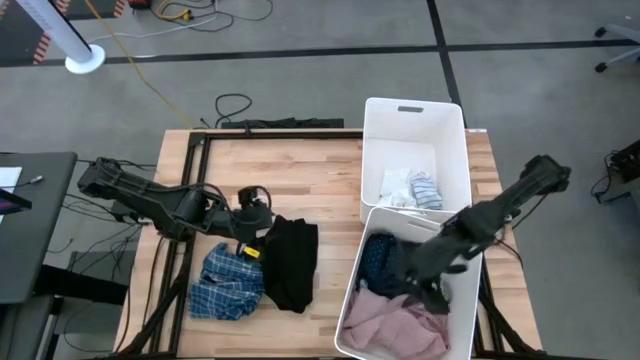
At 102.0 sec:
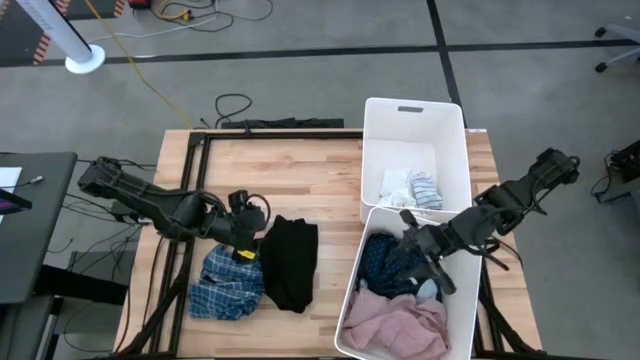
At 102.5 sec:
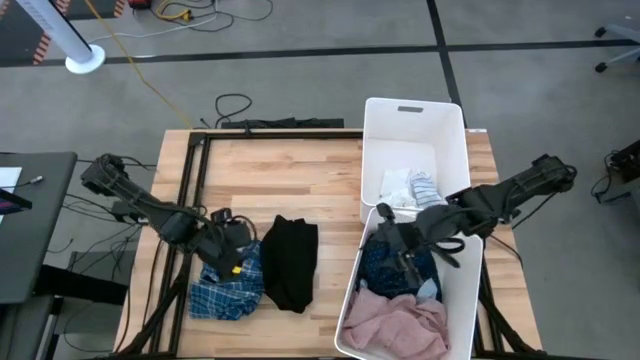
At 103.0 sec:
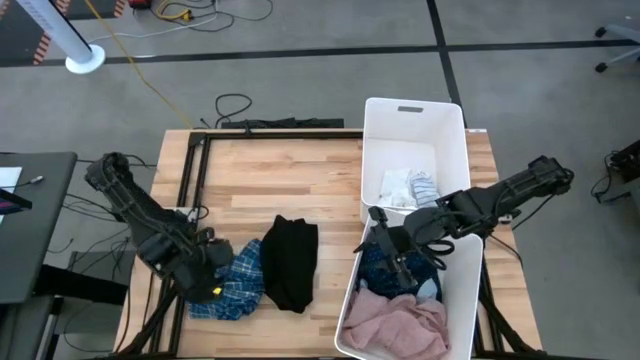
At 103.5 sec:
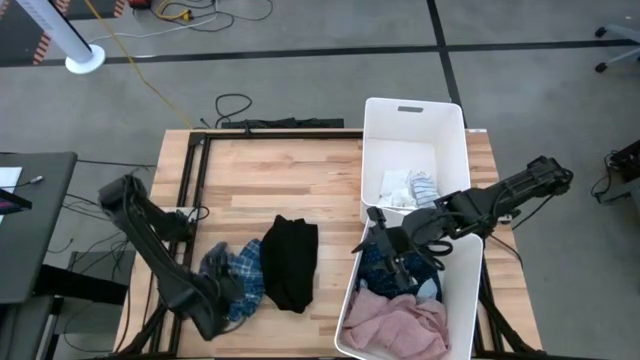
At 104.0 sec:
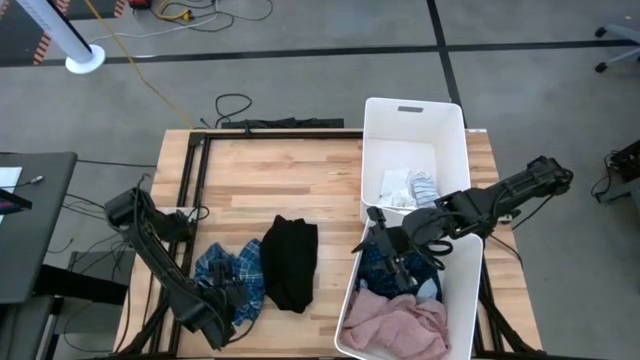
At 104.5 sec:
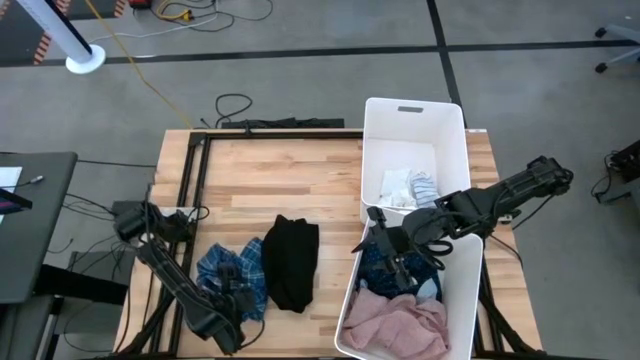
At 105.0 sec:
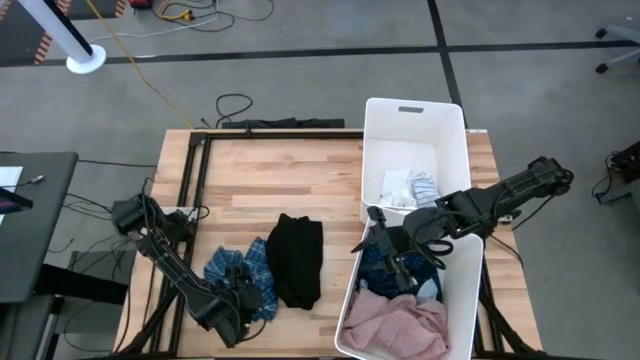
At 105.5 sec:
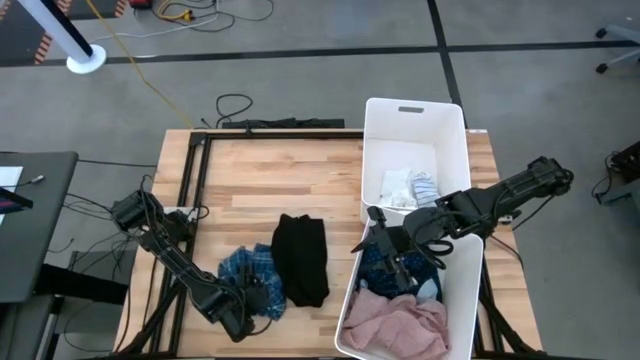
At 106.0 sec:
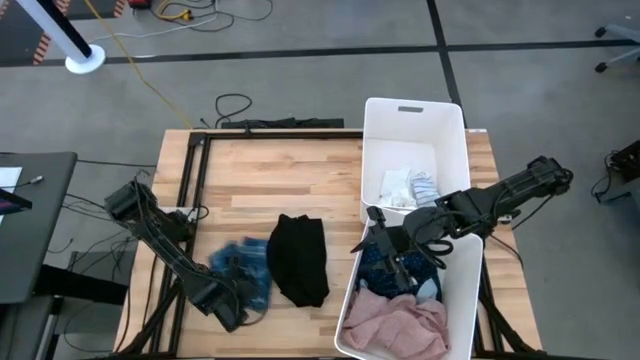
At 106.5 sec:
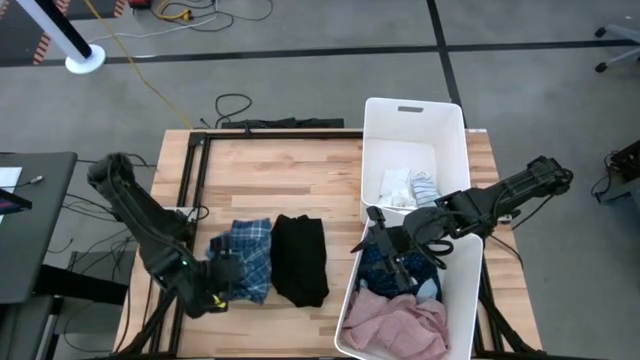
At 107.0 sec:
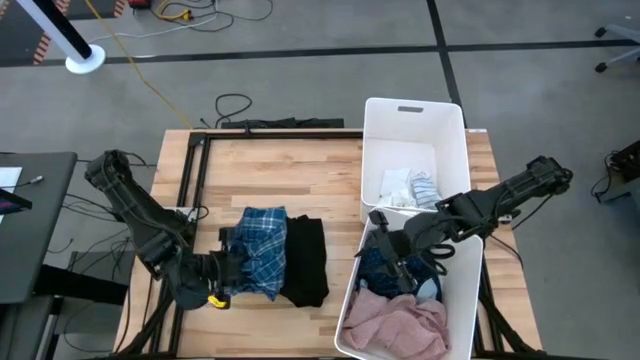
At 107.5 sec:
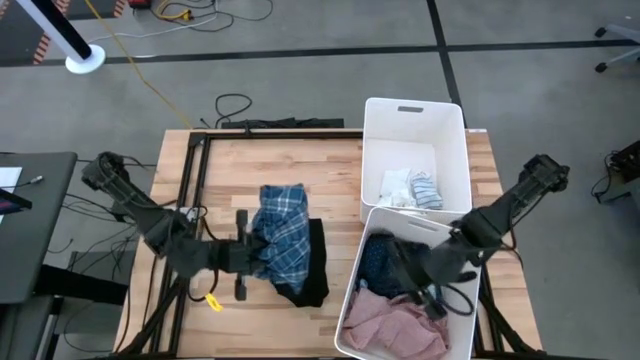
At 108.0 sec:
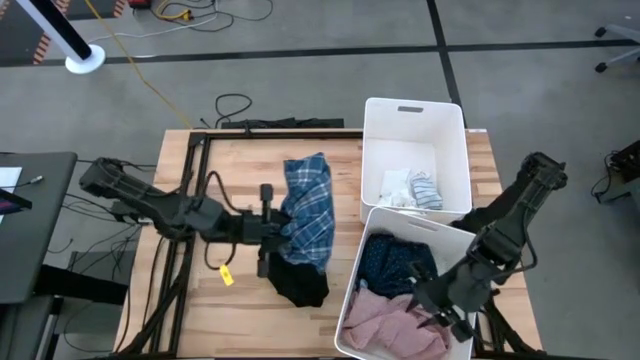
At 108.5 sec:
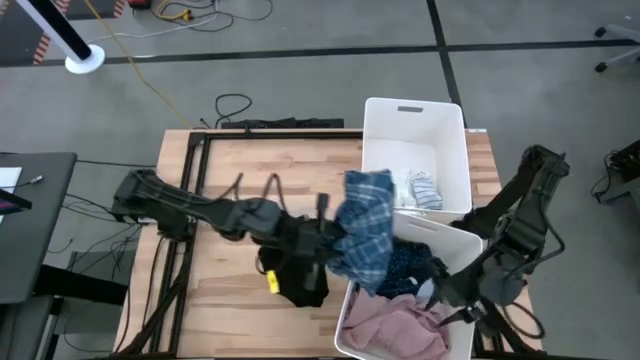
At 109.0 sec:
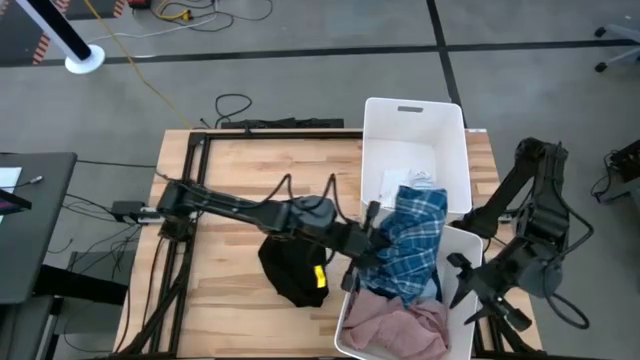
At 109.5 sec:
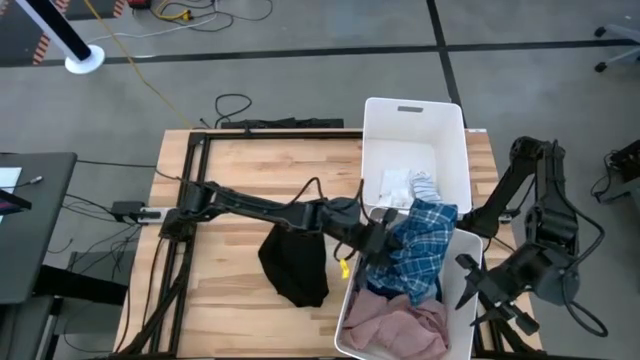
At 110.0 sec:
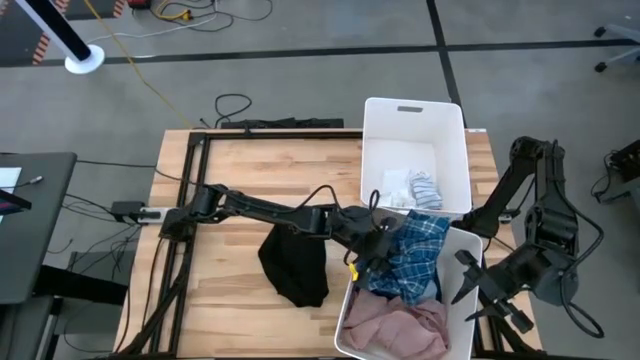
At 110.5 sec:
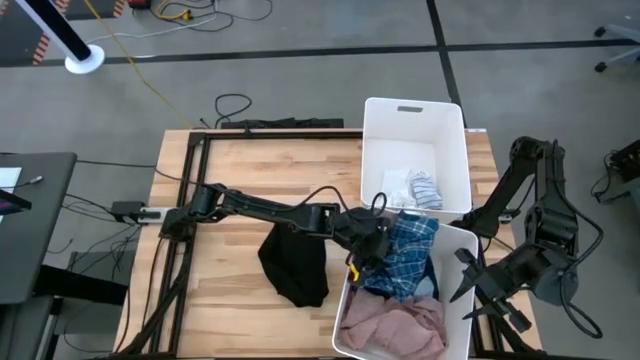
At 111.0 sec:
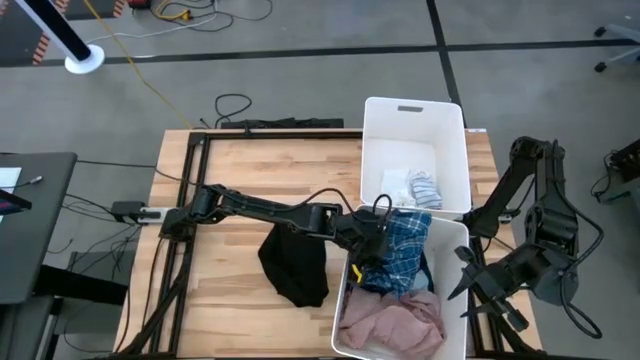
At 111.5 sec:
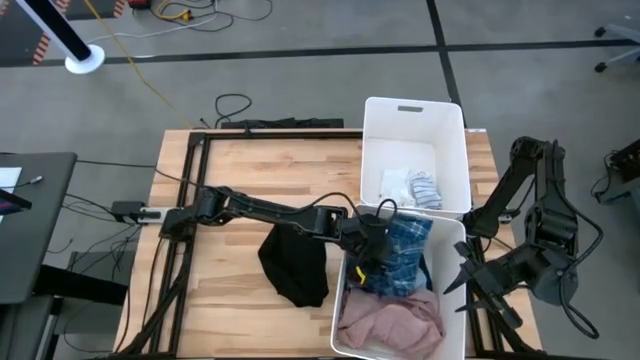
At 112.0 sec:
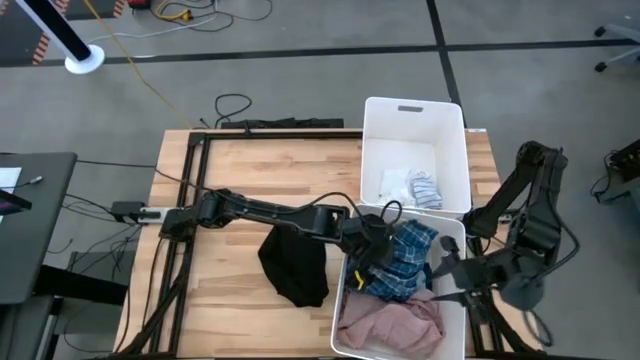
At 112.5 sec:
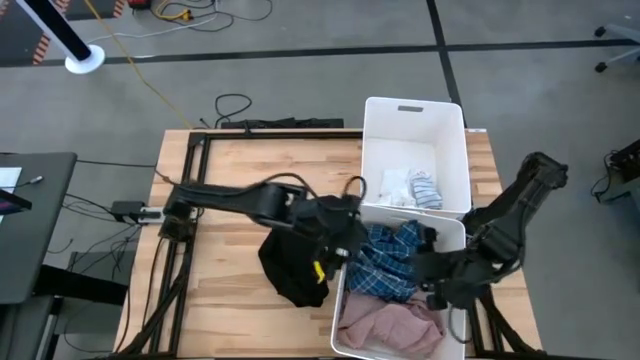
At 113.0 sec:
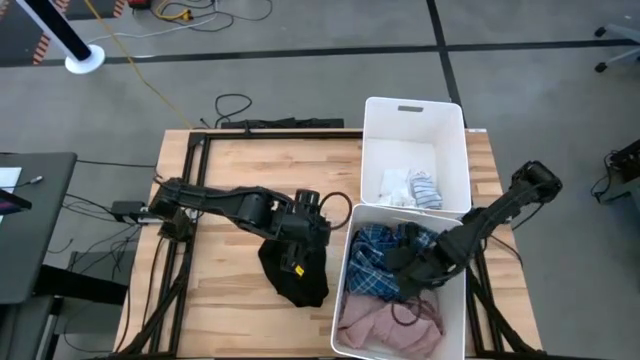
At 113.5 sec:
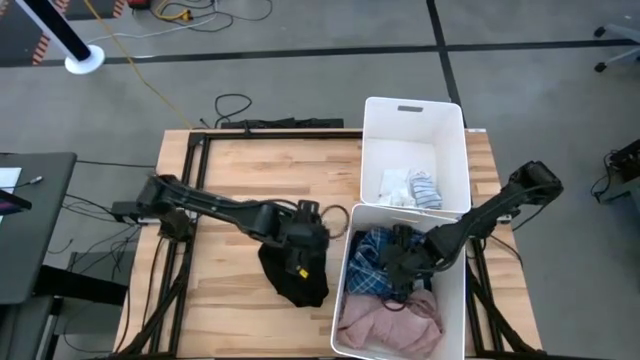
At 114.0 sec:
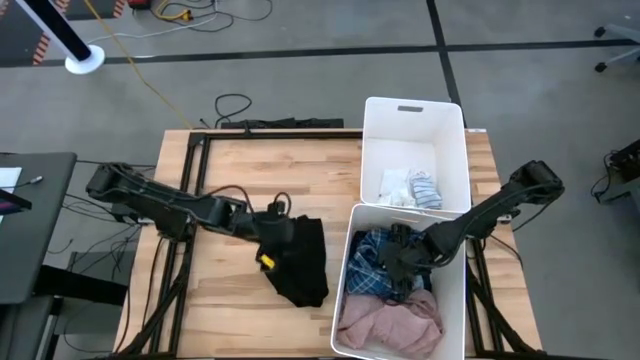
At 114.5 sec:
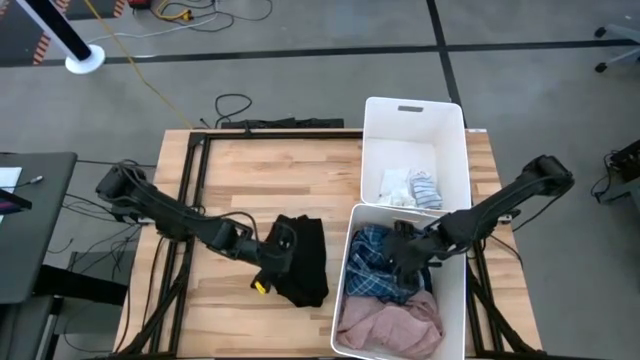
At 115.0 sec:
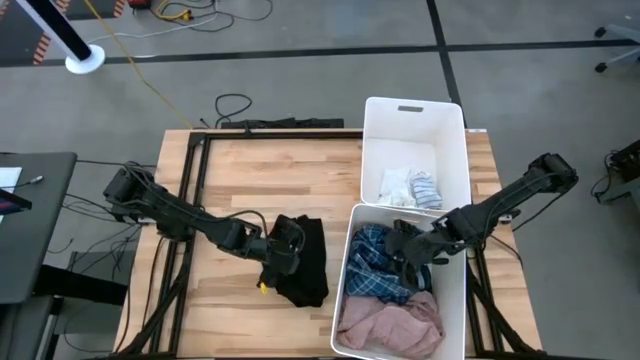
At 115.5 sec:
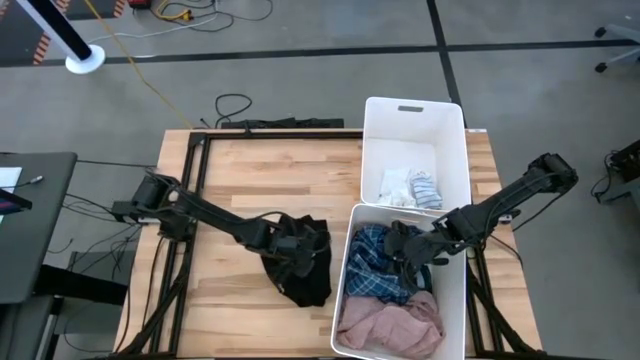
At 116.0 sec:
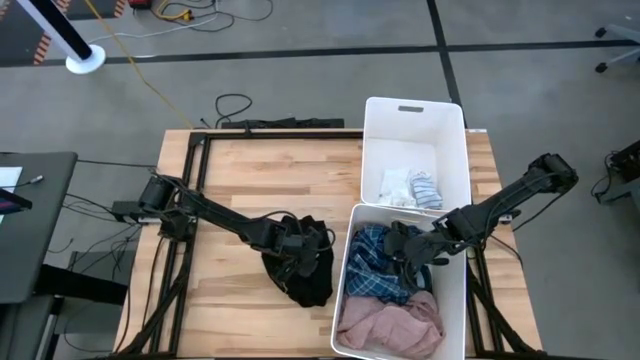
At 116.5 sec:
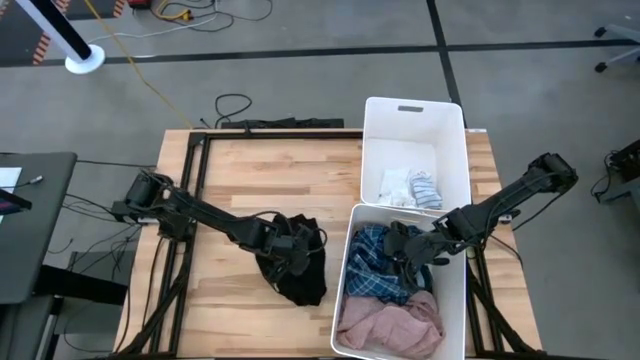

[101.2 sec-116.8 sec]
Task: Sort clothes
Put the blue striped polo in the bottom laundry bin

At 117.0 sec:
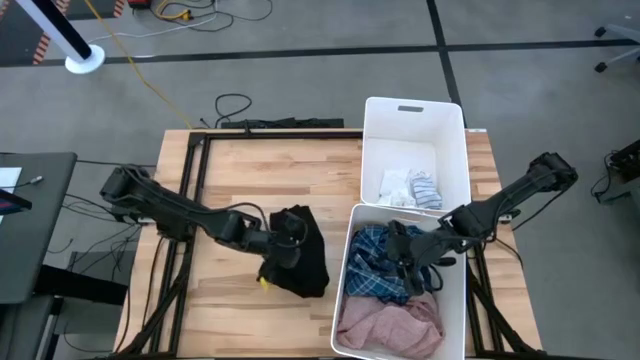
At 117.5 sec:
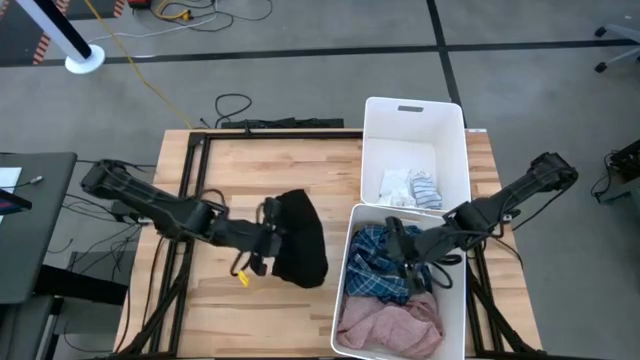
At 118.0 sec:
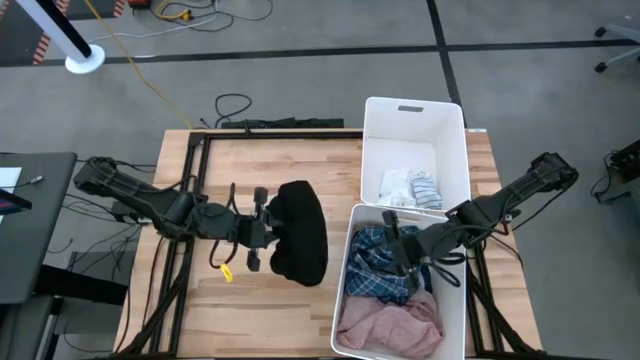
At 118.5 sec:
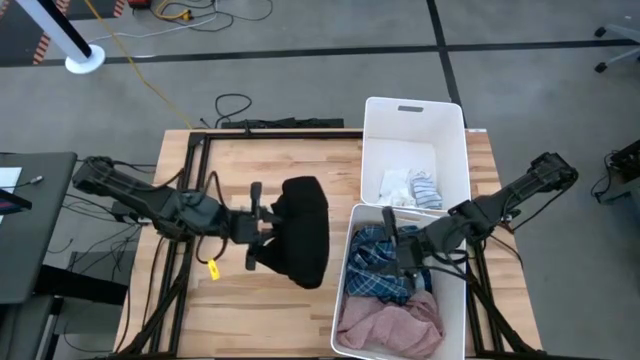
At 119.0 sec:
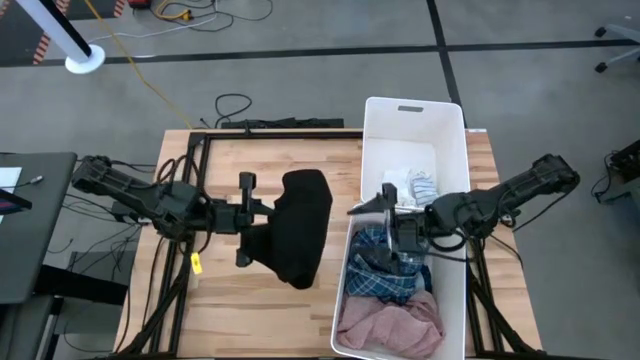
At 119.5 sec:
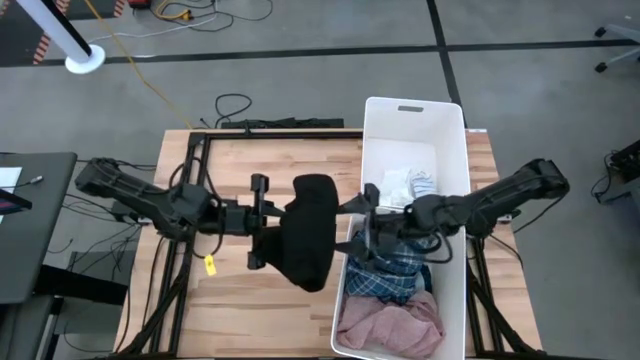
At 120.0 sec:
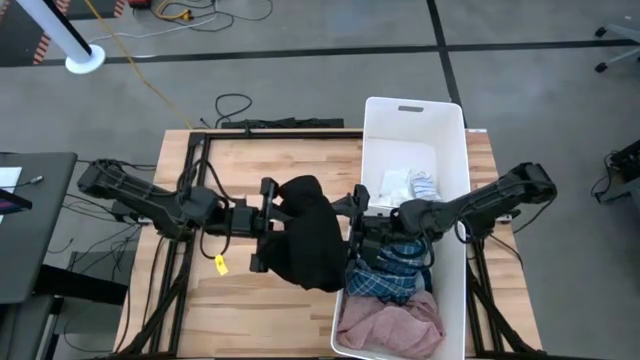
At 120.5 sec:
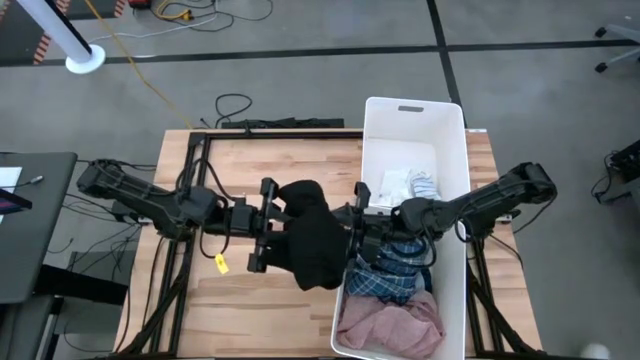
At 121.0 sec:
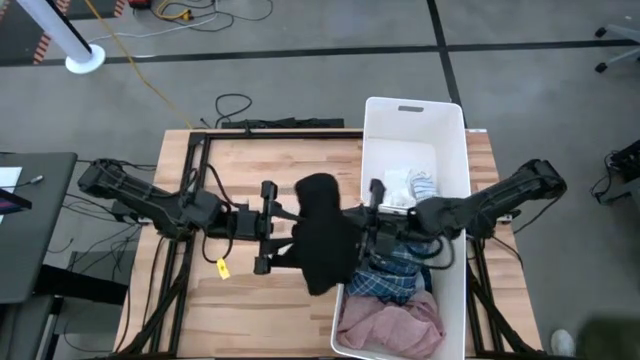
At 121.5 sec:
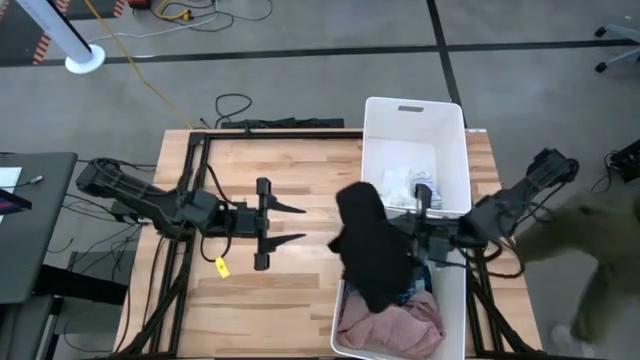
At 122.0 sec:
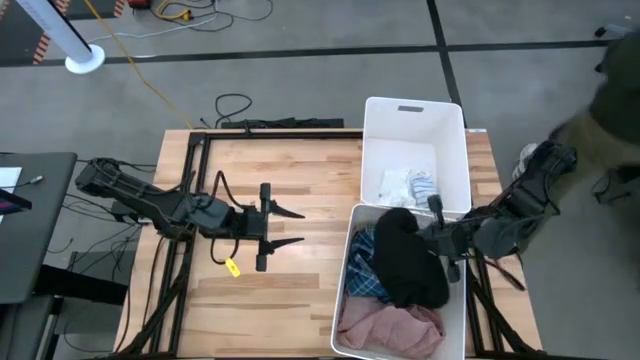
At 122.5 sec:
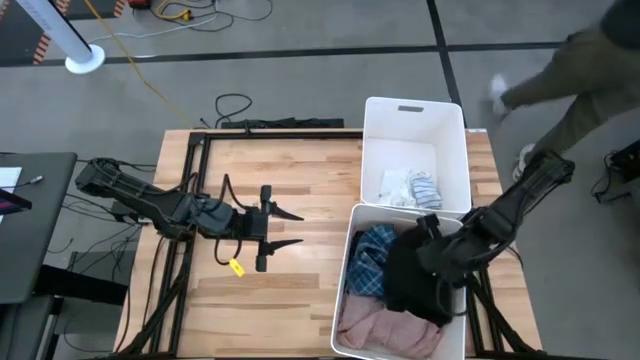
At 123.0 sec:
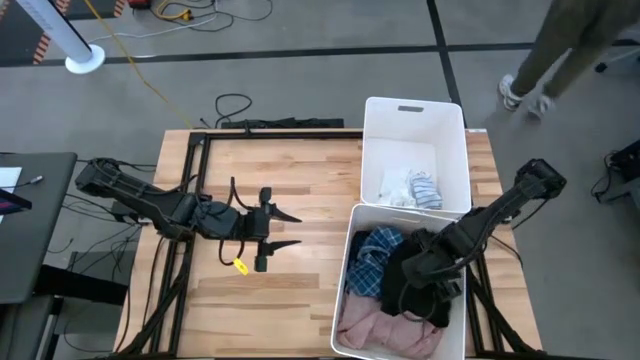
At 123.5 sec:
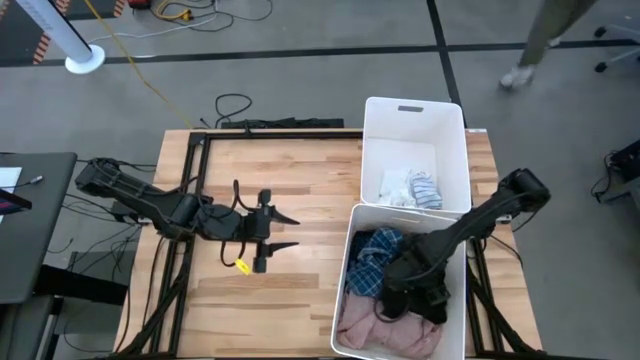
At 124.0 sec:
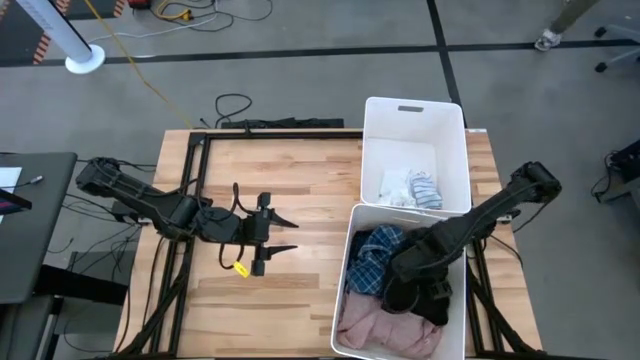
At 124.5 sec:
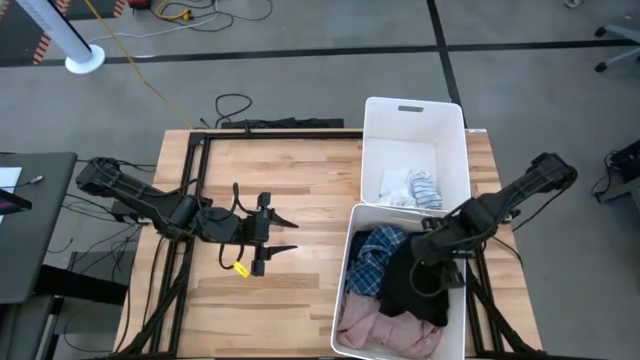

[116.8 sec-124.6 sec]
Put the black jacket in the bottom laundry bin
